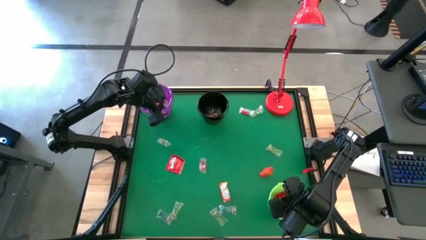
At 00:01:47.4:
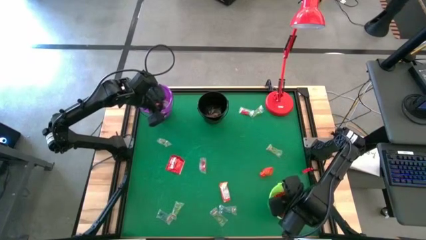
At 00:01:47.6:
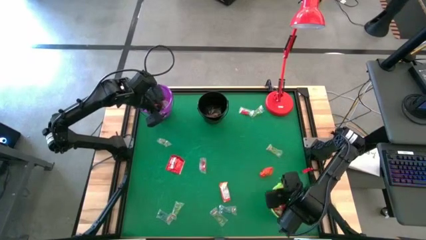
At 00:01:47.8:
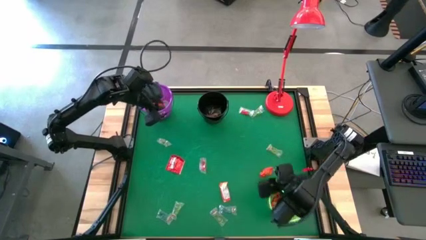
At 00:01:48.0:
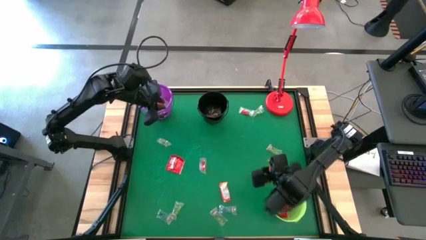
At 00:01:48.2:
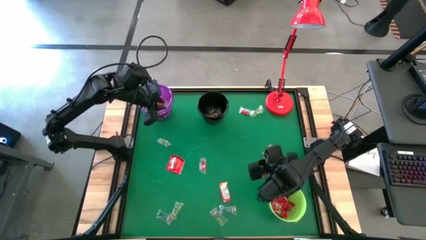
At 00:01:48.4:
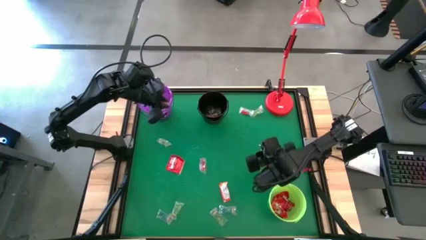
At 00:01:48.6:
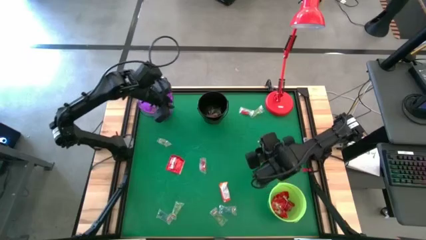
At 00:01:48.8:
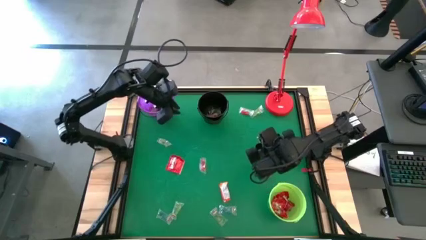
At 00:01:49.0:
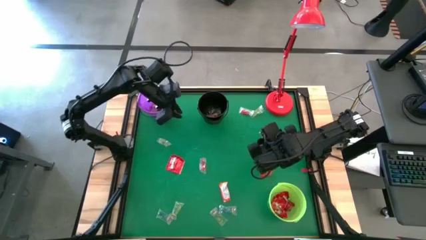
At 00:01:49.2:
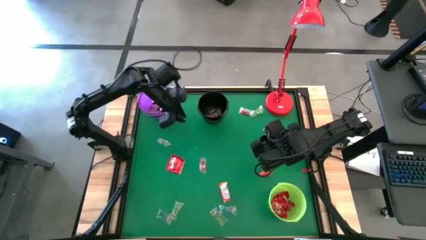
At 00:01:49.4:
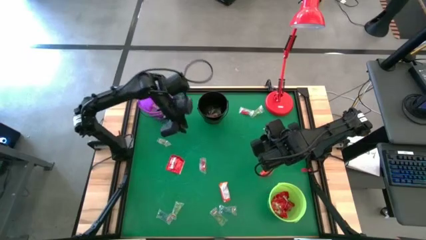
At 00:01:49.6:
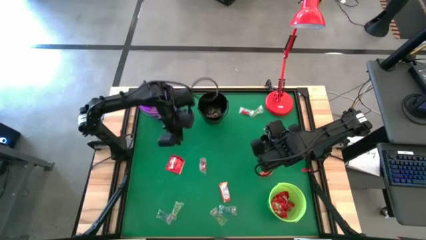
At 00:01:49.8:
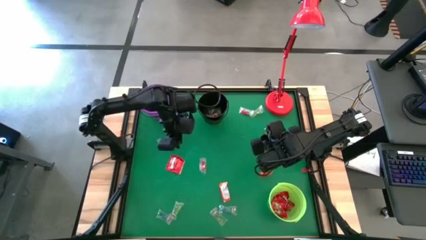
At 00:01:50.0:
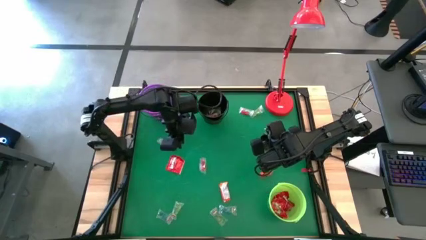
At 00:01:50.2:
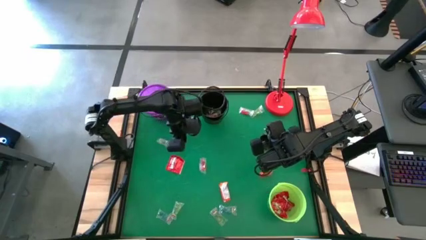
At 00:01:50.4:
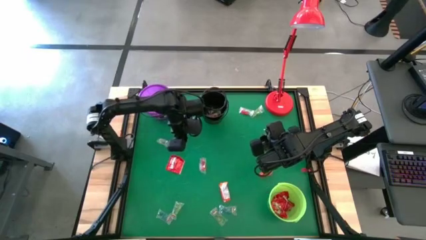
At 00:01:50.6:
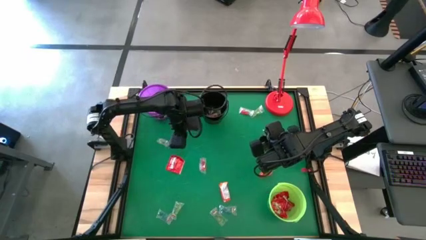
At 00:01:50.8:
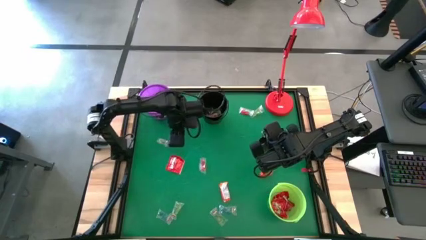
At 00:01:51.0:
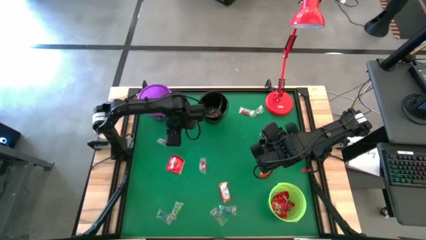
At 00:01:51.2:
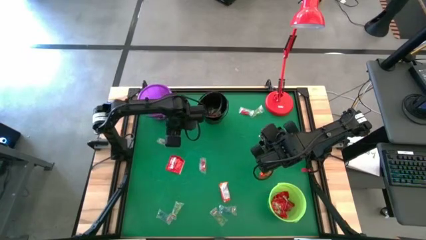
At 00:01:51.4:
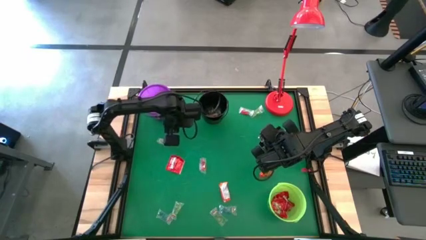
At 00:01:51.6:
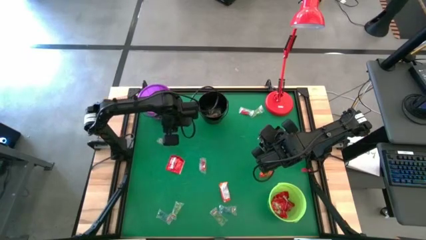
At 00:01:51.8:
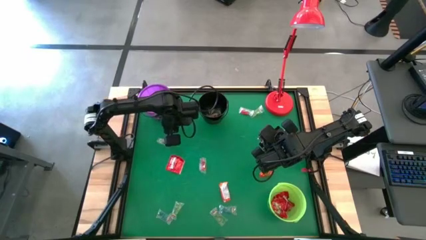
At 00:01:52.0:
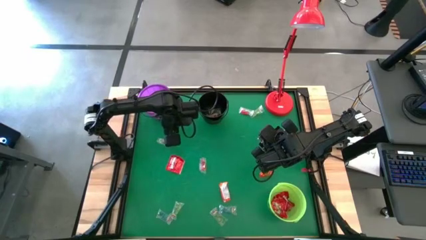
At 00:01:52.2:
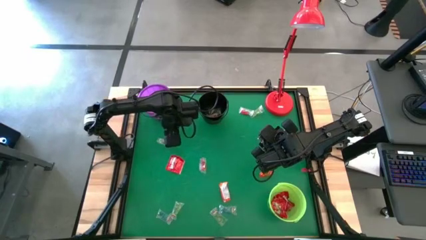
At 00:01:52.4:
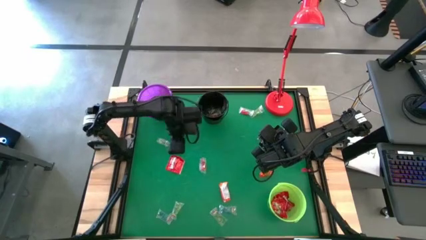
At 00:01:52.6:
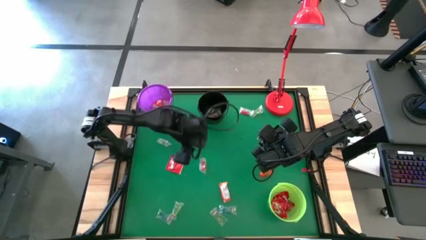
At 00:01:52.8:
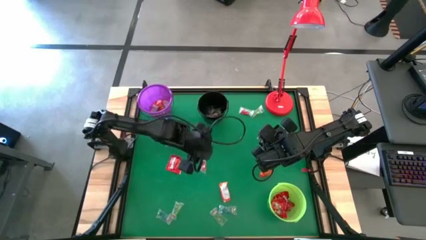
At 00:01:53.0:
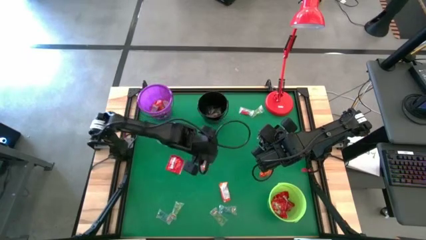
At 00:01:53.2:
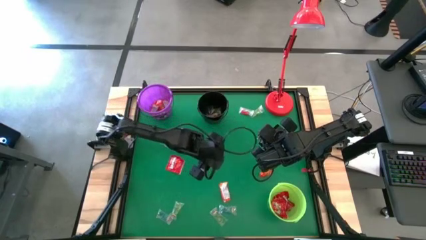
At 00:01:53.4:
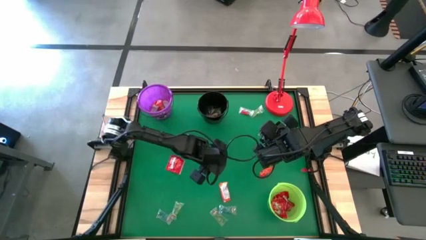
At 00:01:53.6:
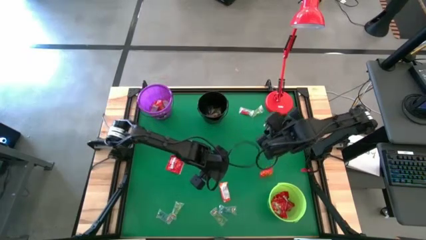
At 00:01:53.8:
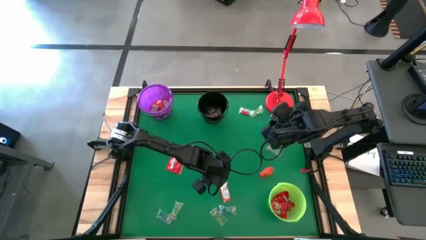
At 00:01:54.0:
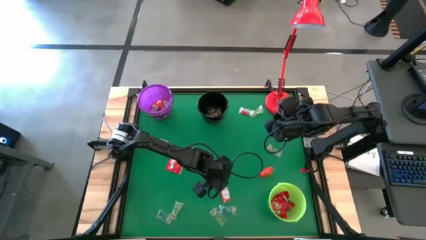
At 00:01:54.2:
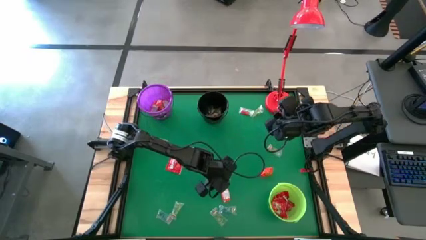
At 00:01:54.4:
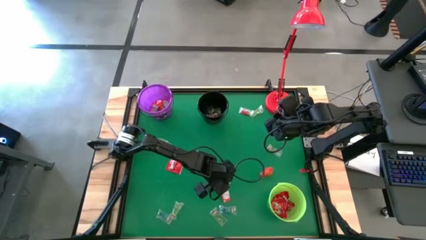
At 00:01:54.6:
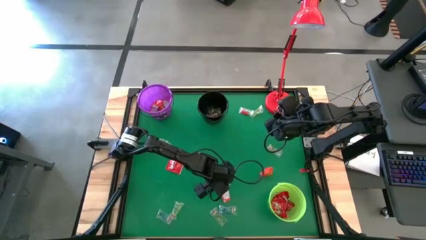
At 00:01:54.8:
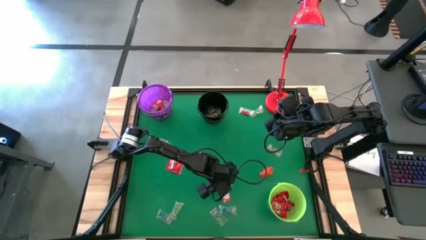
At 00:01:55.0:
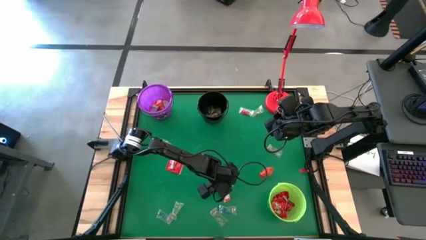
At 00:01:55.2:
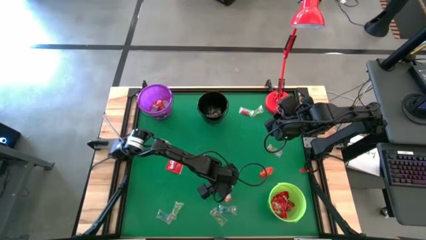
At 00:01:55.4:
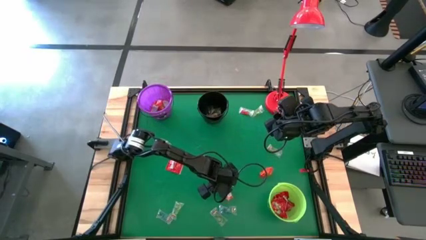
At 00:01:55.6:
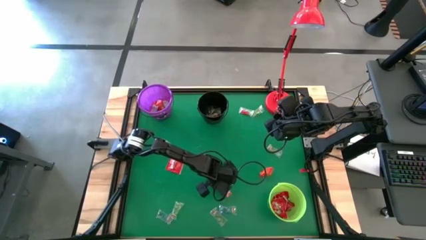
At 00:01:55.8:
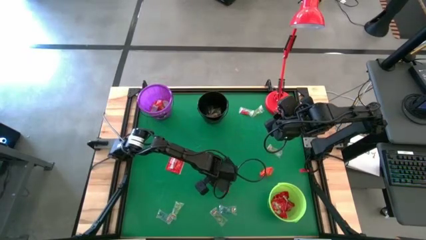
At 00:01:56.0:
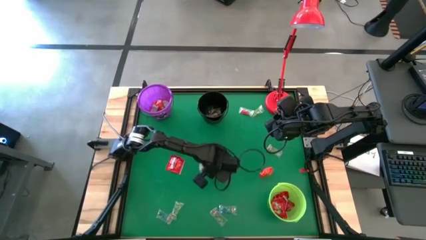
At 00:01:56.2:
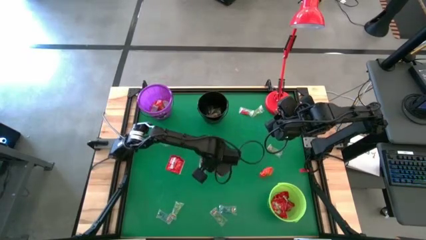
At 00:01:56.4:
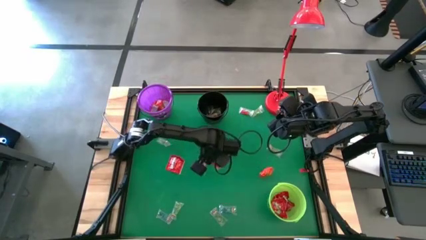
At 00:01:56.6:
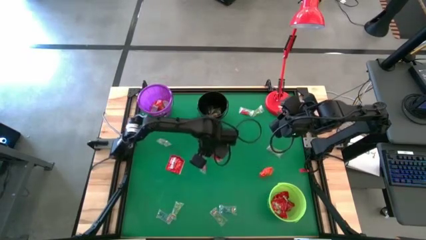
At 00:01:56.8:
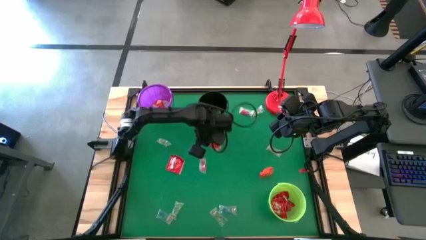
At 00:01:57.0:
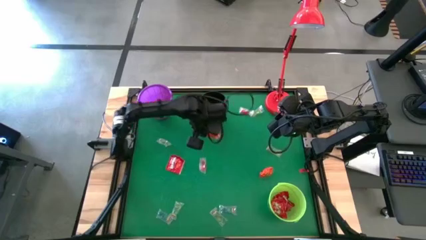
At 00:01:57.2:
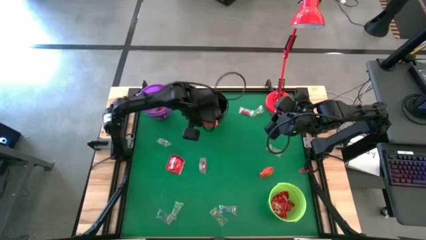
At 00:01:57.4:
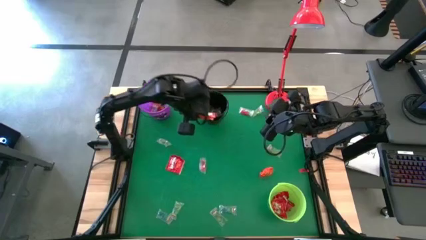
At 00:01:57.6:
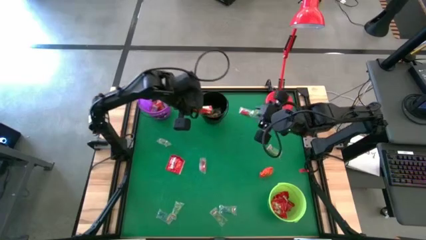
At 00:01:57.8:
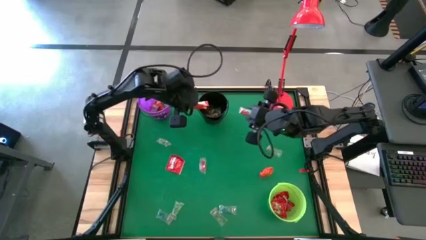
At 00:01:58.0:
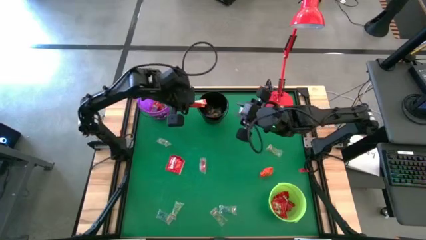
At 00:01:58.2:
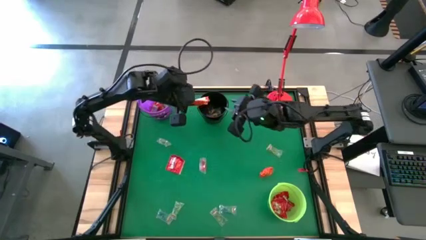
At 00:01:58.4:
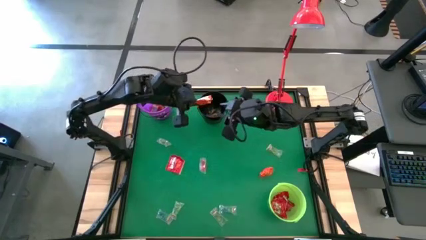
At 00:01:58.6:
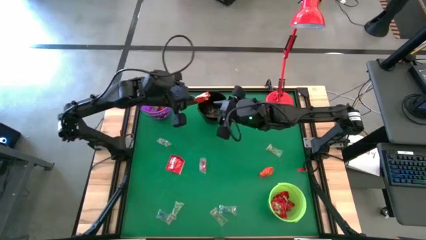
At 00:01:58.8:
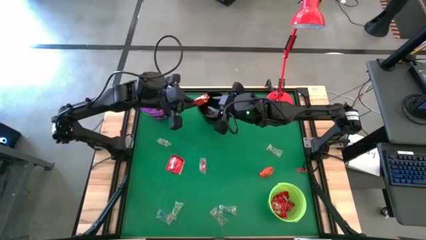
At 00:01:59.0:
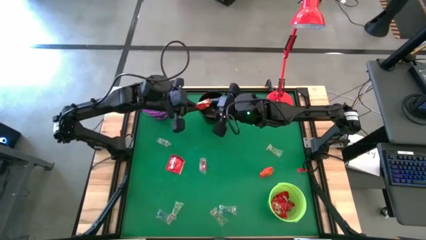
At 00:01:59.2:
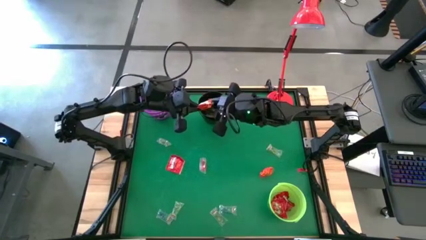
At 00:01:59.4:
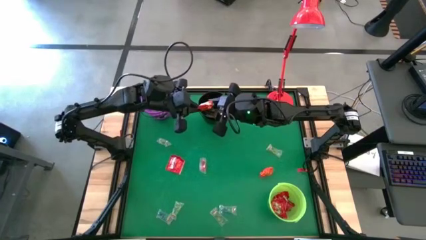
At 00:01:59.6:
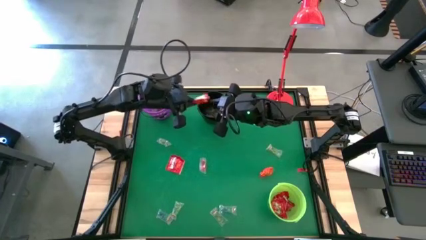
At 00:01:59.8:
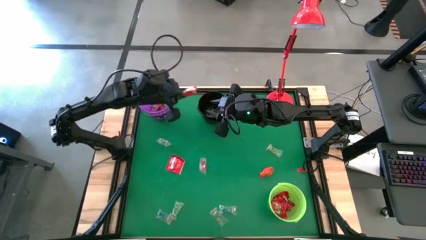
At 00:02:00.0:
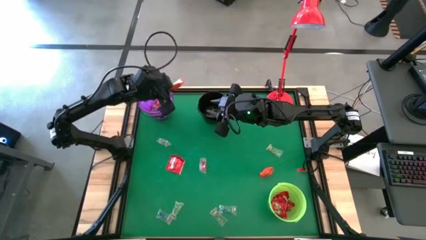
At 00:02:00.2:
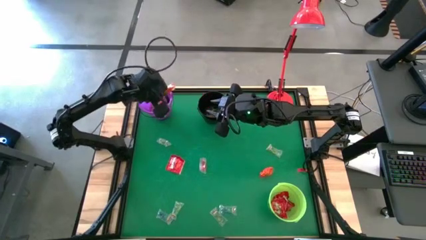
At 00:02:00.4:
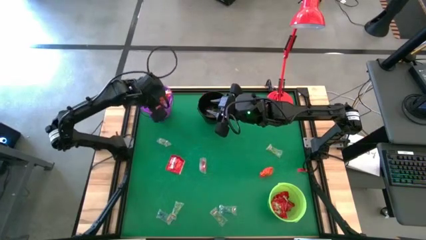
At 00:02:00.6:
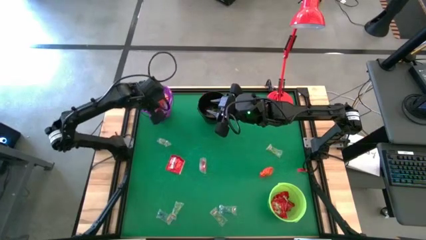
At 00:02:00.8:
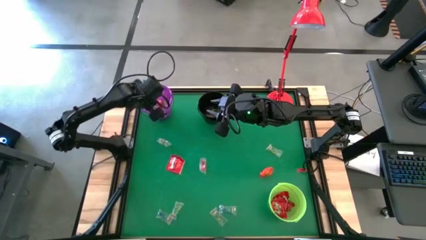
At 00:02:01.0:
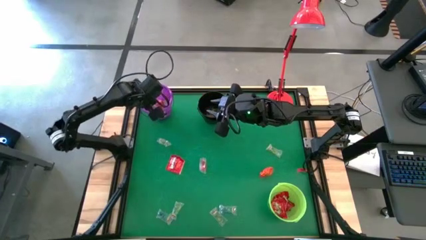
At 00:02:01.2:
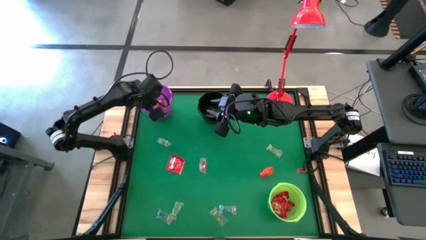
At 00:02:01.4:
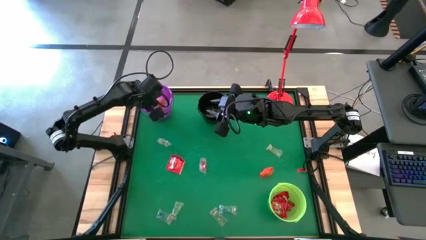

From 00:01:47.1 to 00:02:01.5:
Task: Sort candy
Put the top orange chocolate bar into the purple bucket
